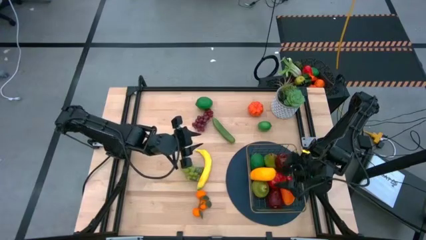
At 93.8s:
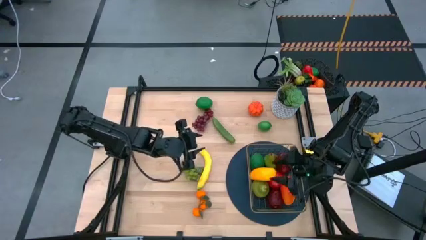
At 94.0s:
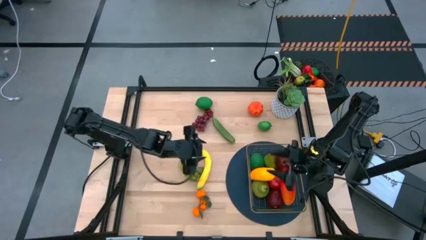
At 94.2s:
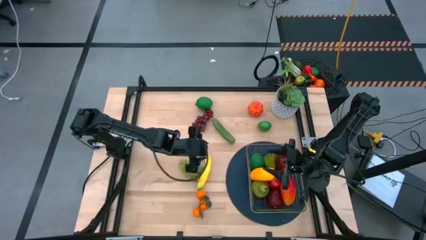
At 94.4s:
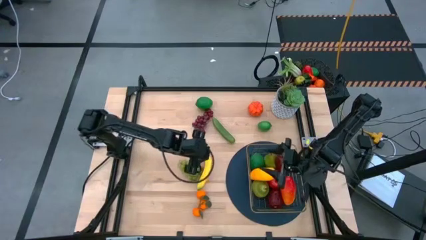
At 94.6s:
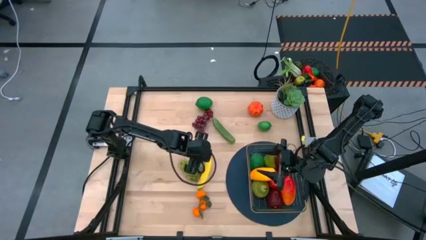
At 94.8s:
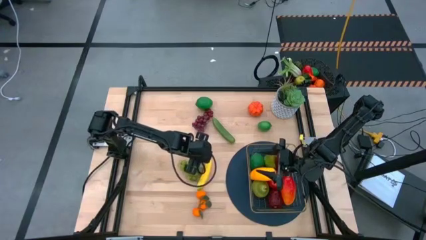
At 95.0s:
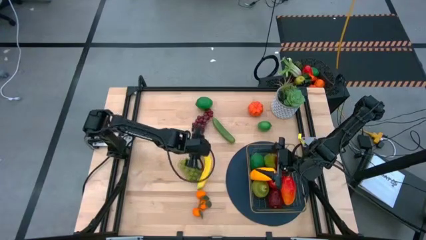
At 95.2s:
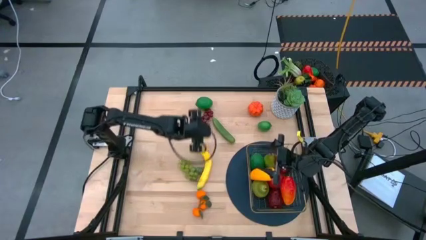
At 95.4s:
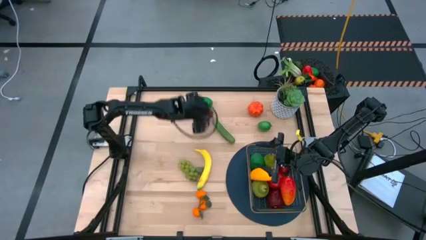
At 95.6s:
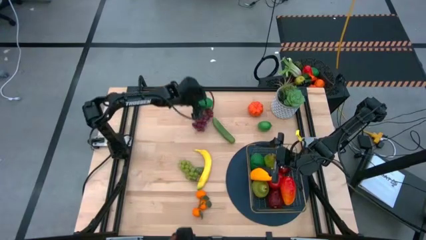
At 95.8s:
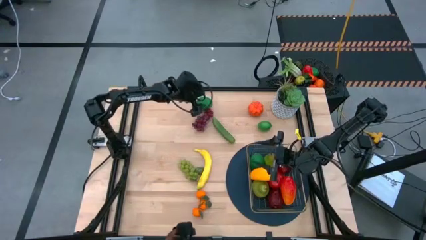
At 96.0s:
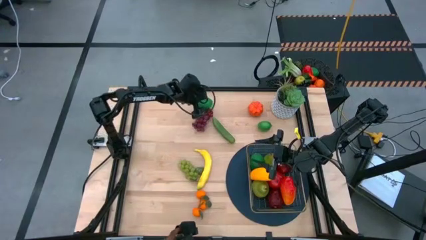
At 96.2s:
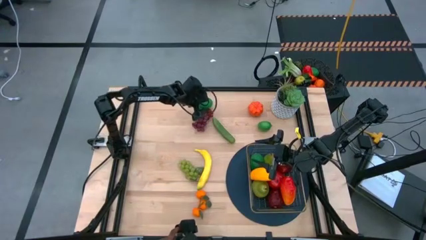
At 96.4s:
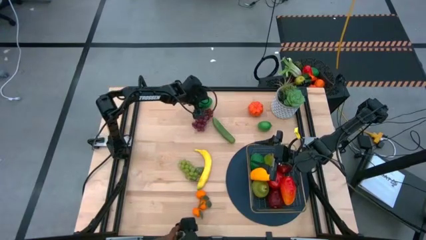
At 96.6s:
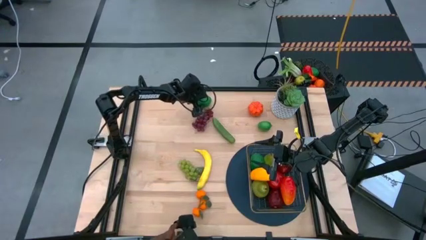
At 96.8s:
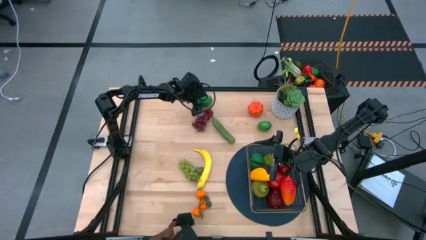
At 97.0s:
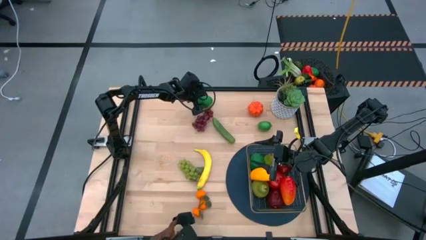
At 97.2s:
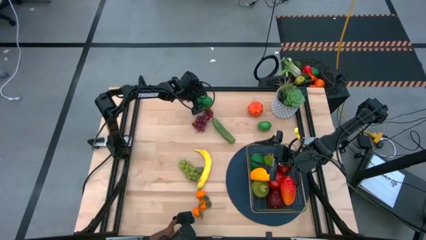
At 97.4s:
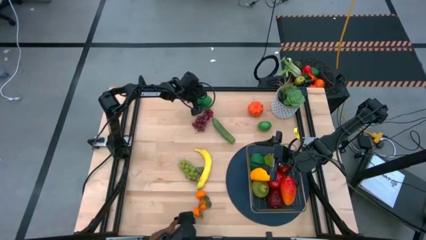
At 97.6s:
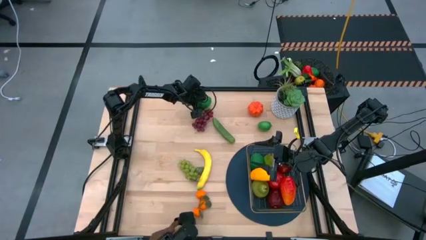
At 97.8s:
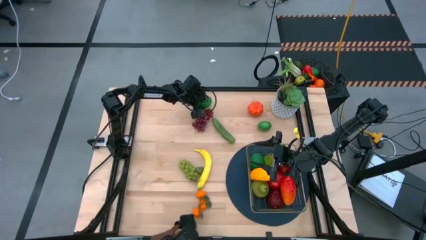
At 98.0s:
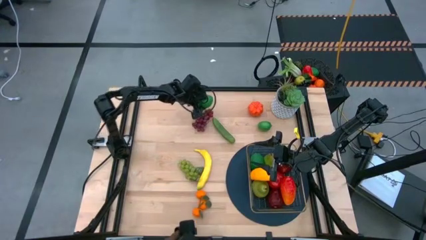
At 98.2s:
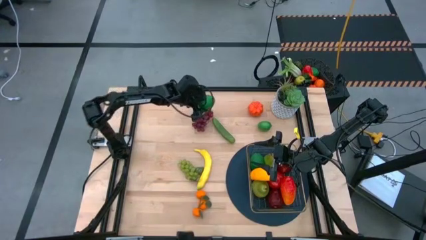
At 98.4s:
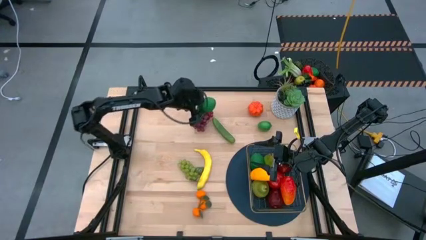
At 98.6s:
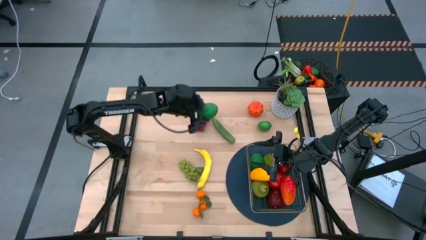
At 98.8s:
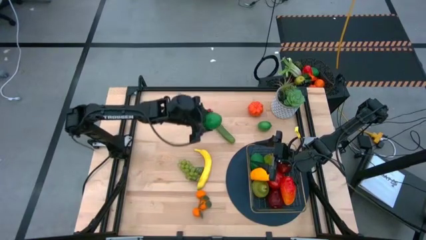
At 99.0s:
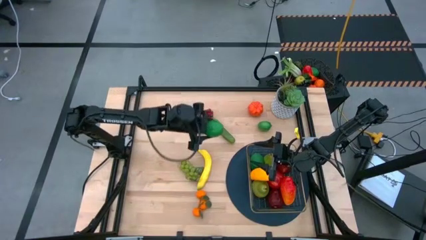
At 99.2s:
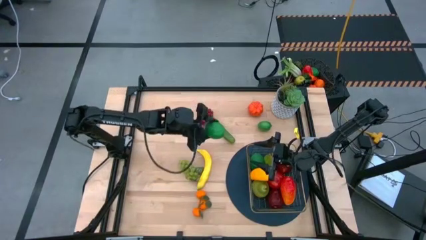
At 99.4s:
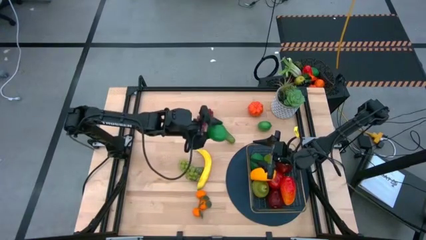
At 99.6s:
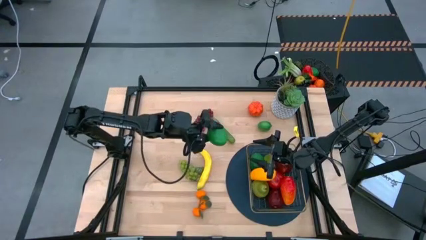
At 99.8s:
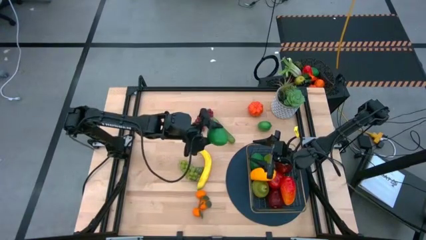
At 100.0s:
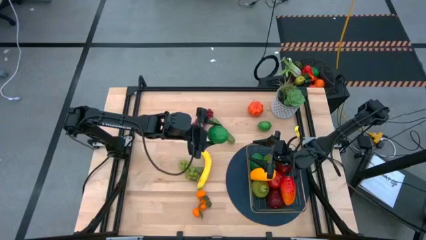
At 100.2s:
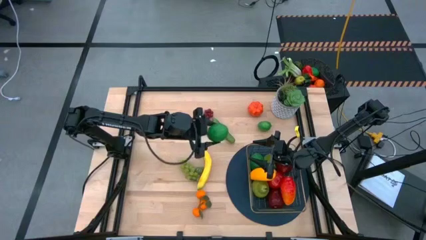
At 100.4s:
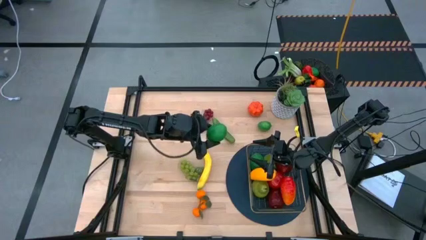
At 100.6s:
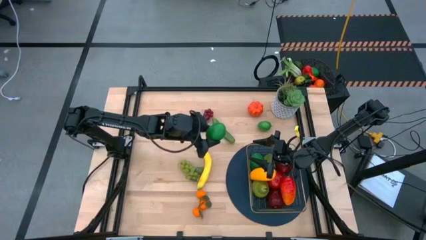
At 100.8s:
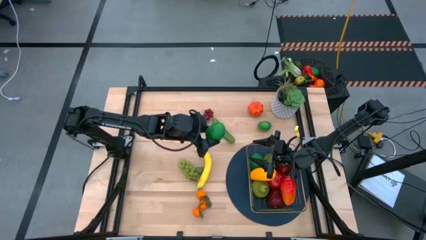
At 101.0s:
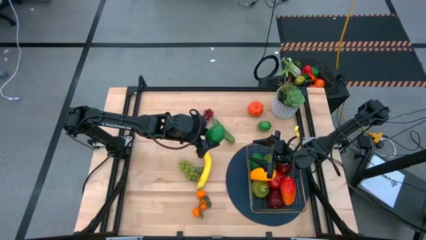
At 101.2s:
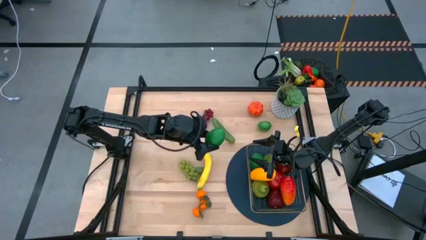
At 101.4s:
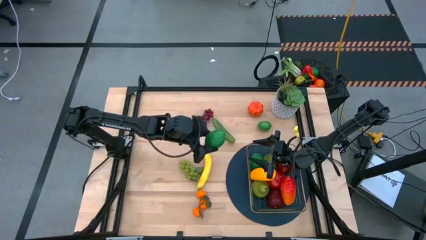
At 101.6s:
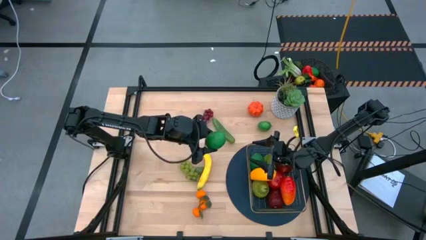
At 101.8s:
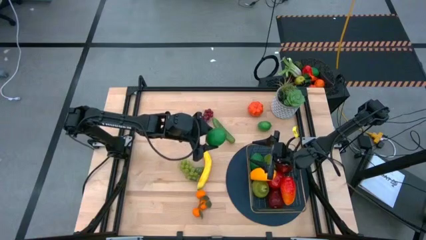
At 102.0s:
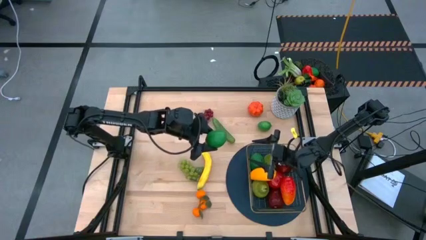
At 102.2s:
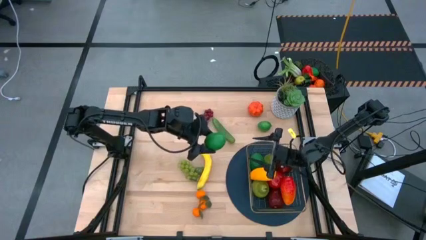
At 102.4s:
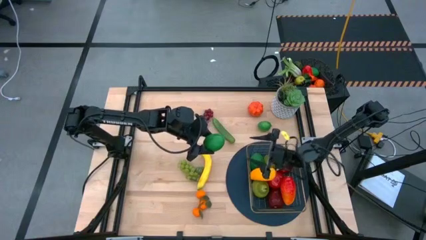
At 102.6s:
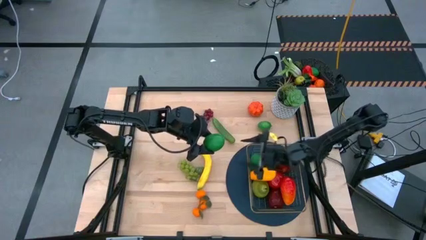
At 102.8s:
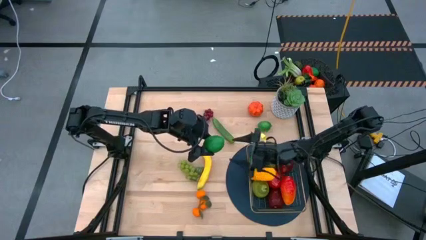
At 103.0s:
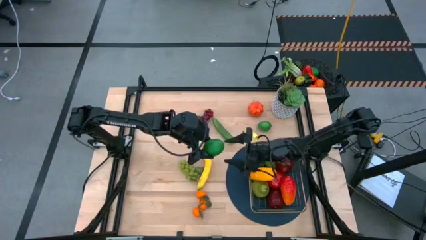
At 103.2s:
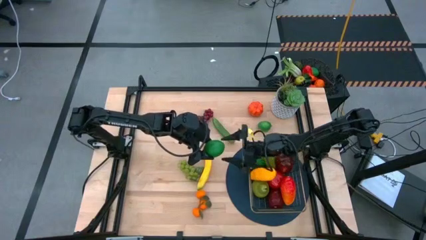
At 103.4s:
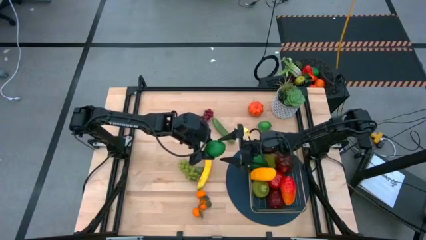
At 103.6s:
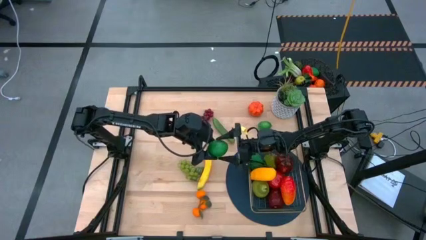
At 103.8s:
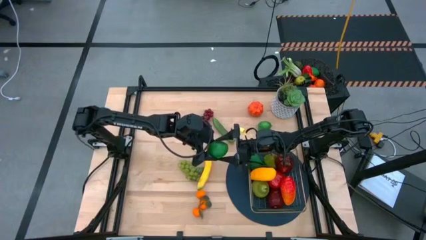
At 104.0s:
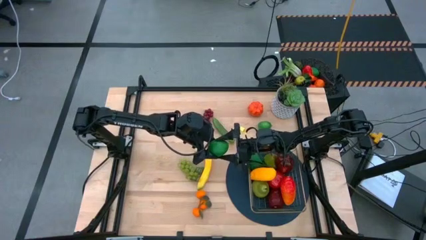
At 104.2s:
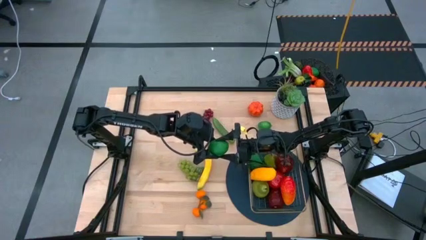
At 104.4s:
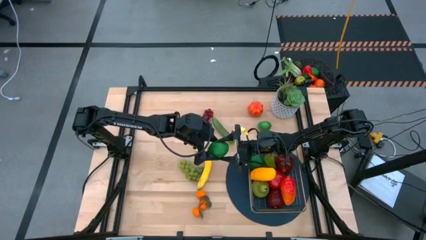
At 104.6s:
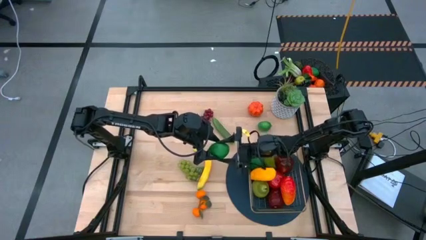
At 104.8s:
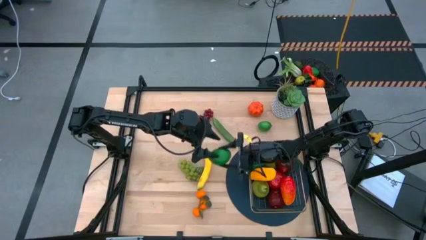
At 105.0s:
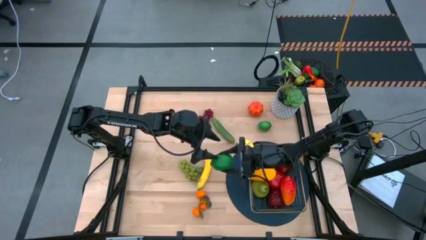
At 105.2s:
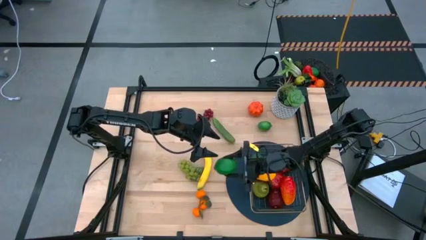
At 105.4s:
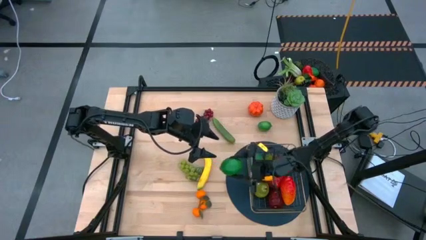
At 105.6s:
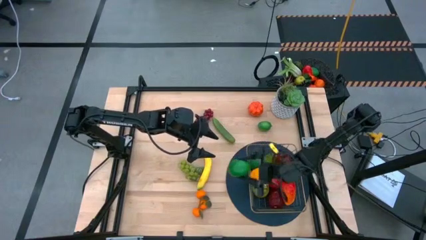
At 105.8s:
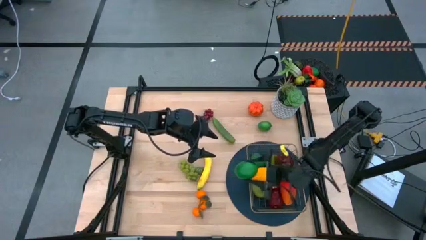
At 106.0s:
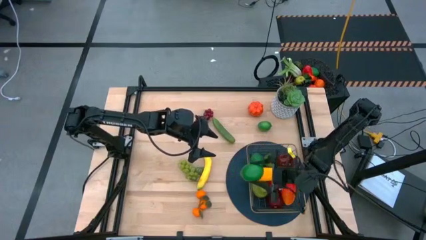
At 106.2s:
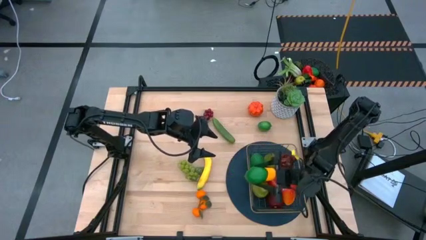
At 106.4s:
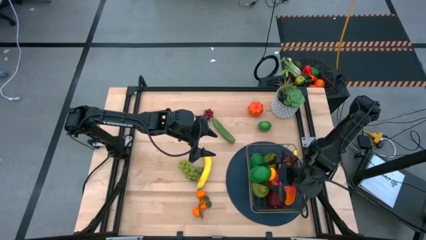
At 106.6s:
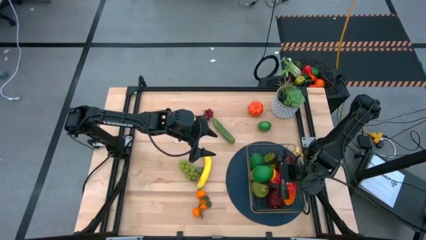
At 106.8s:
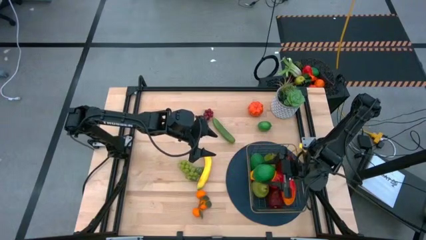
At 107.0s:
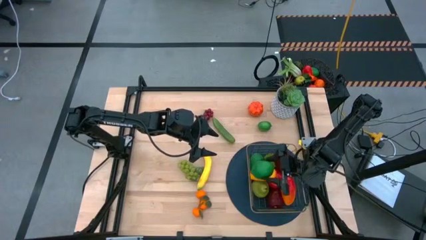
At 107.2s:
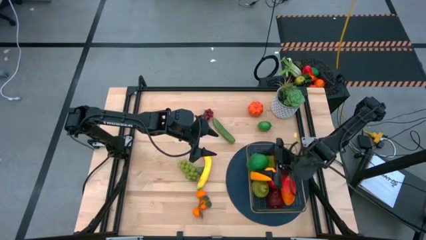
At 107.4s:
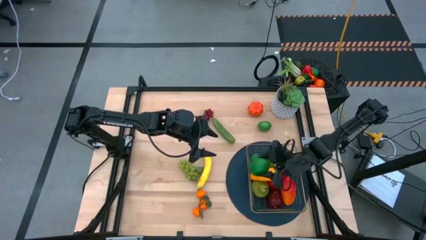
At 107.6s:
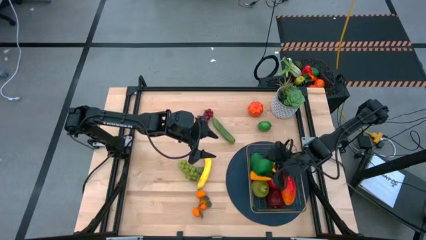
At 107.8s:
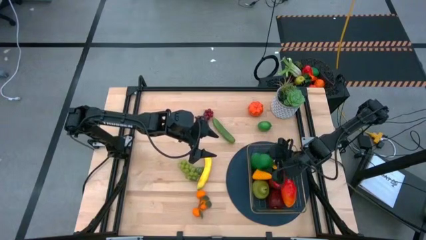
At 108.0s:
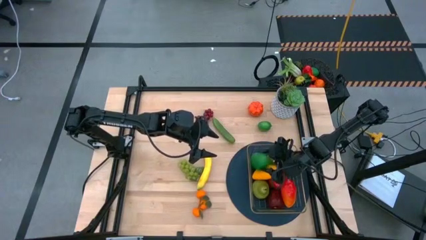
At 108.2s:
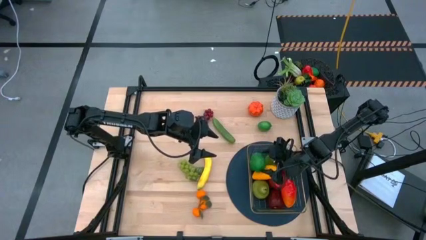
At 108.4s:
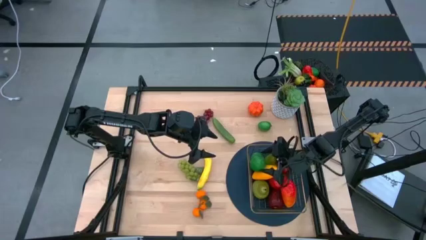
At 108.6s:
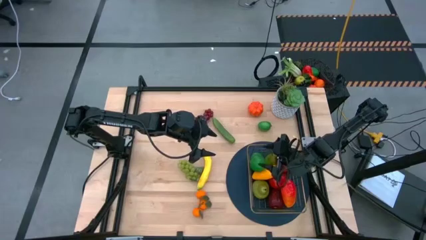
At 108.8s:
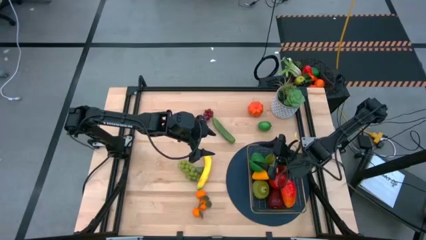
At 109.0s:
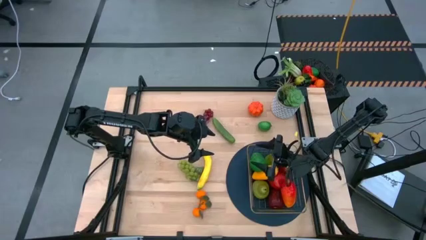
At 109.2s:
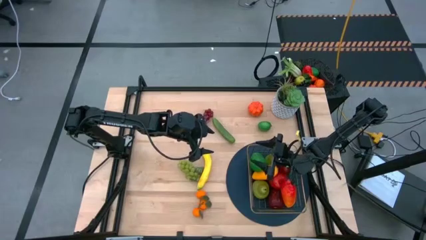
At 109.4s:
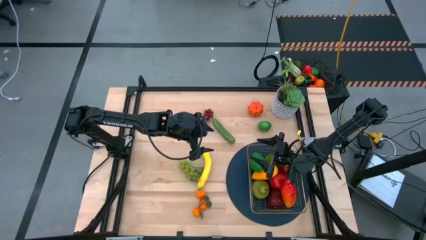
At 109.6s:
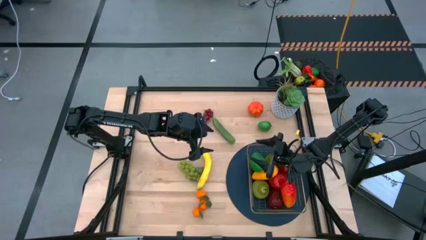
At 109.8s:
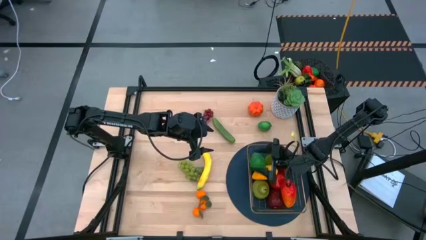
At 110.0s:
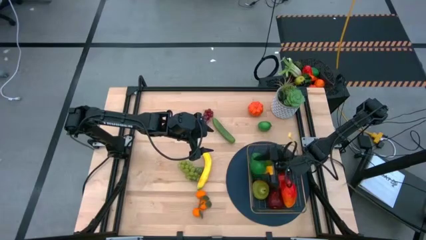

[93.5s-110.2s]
Task: Build produce basket
Put the top lime into the wire basket
